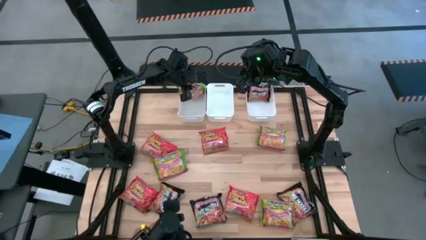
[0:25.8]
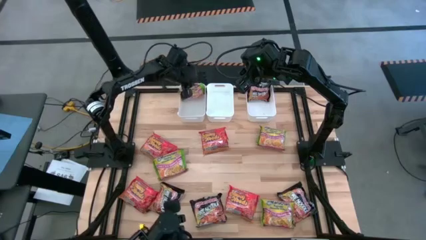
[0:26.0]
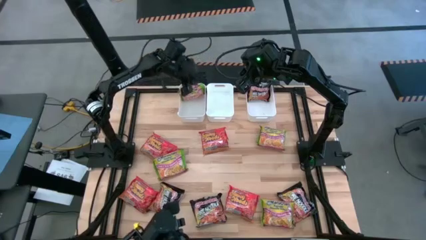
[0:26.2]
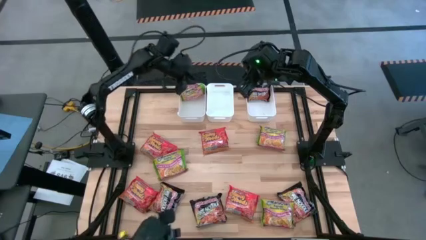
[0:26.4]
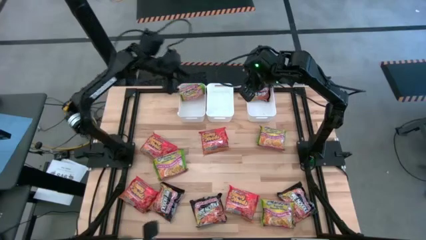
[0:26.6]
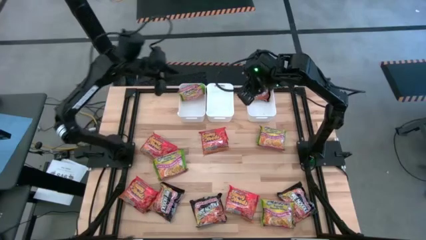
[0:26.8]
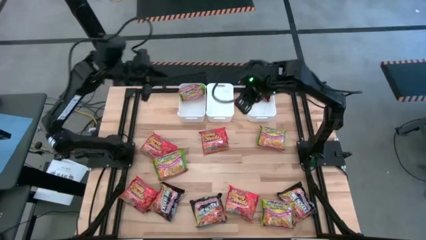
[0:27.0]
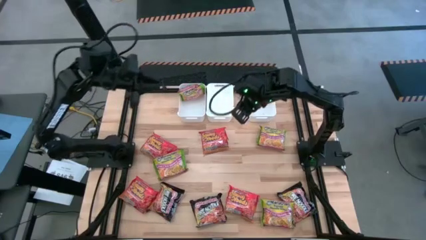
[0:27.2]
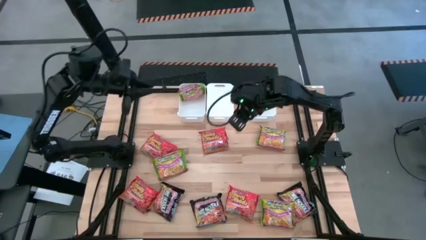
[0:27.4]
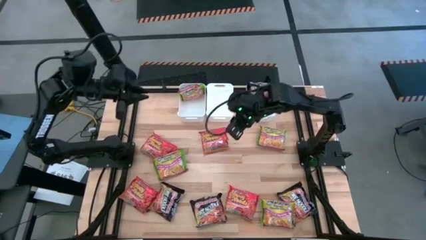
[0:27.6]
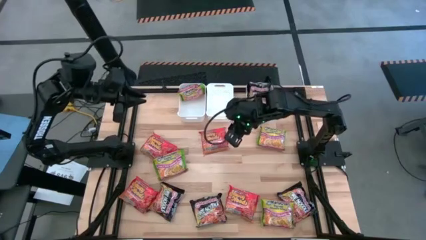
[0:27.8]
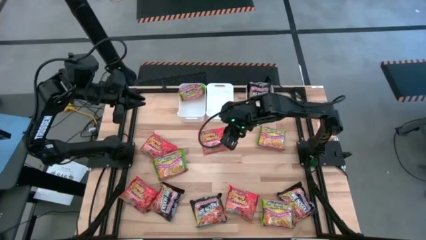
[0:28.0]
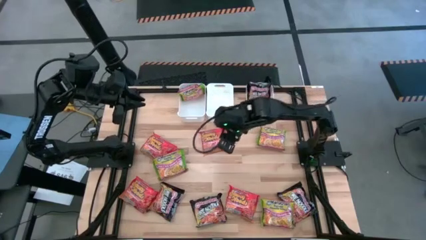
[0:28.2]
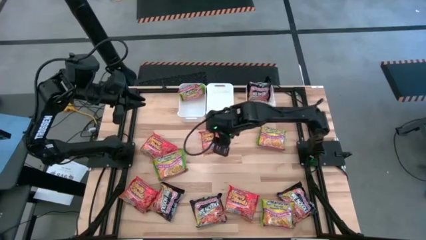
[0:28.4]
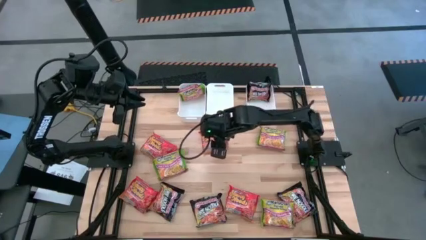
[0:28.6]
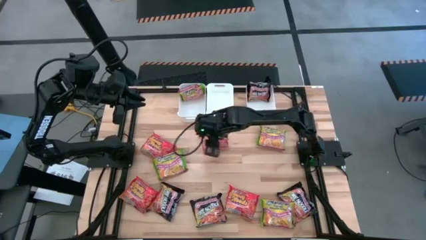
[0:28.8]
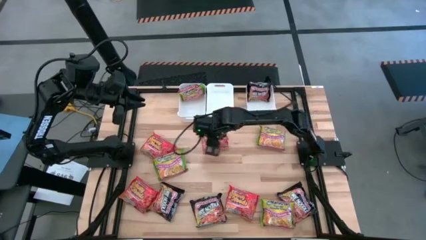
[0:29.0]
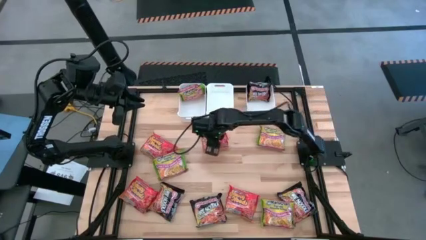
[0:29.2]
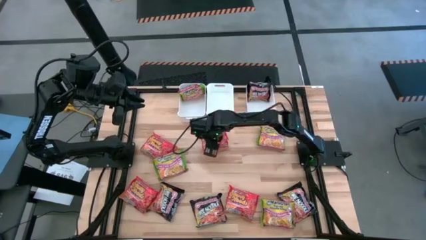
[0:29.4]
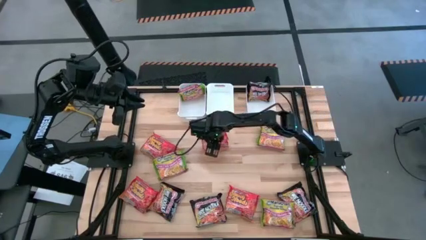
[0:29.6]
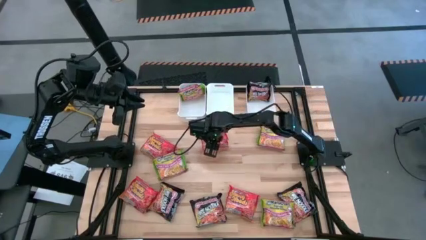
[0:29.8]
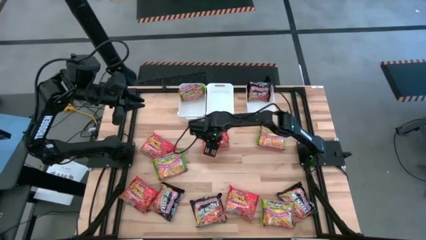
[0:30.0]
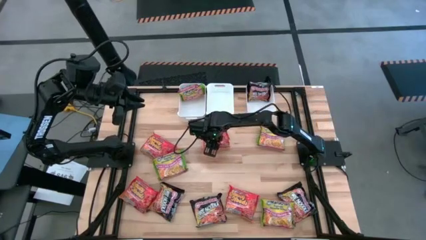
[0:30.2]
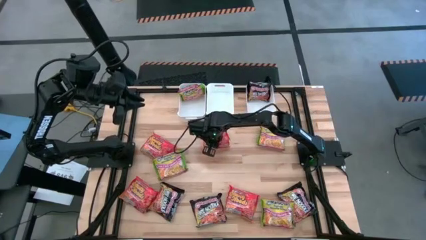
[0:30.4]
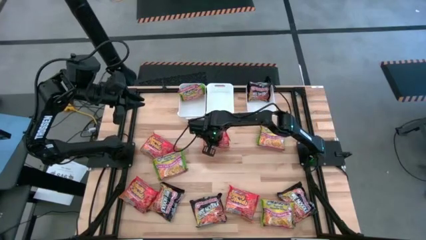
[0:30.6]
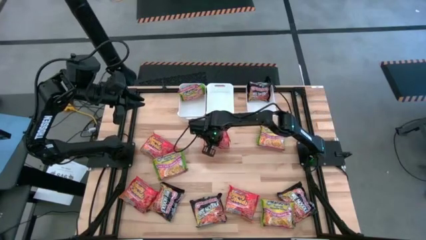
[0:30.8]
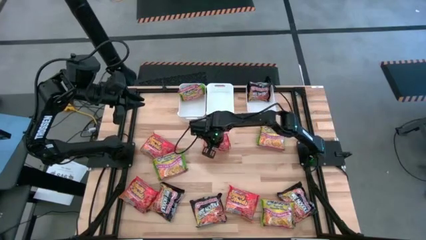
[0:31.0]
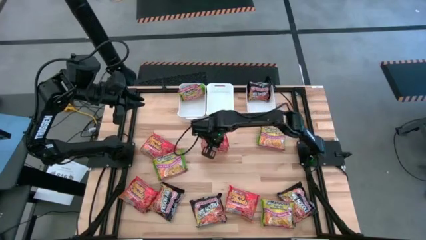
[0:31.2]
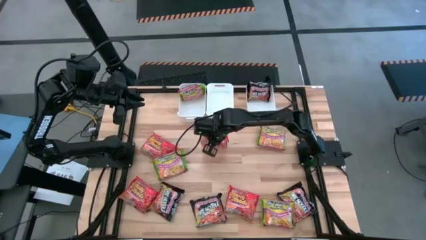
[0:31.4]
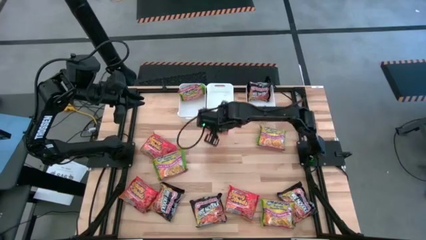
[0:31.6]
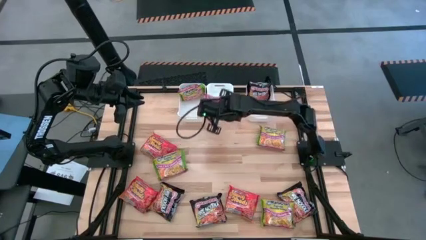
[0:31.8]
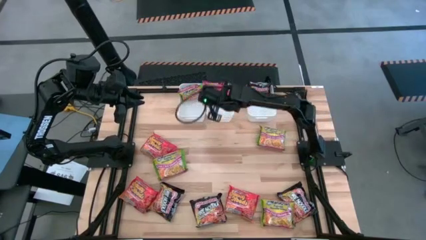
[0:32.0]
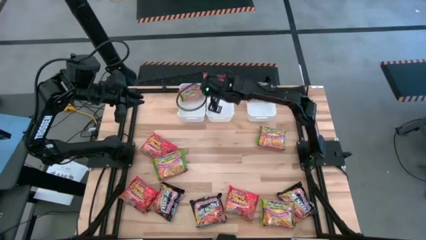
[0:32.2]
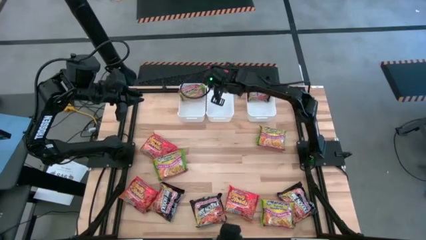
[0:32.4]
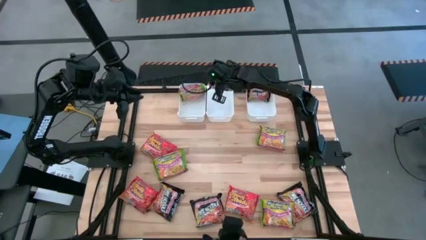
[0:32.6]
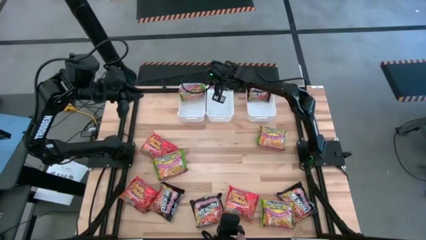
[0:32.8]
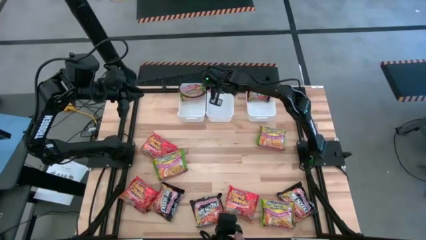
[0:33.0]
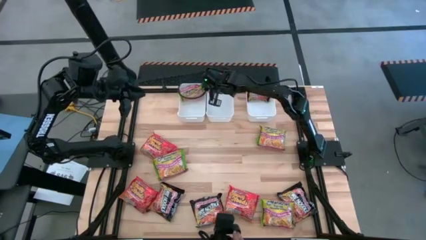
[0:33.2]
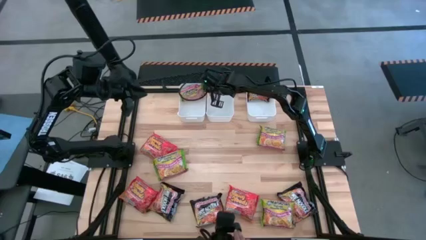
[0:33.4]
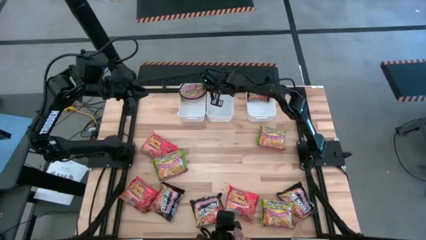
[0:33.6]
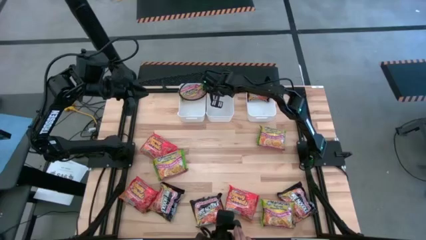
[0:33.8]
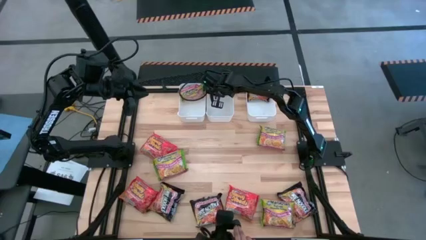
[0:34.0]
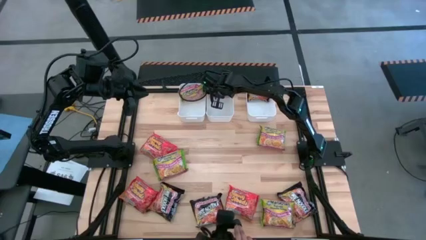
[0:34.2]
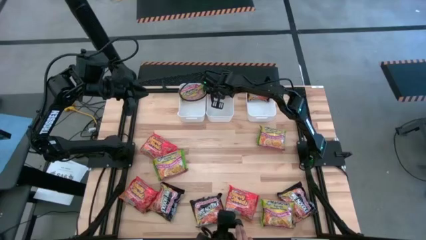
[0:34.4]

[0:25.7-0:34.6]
Task: Sort Maruchan noodles
Put the orange noodle pack into the middle white bin

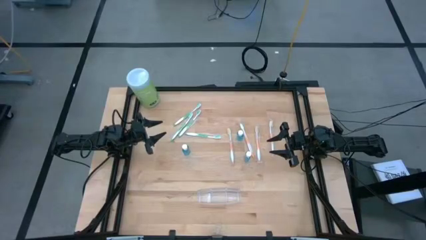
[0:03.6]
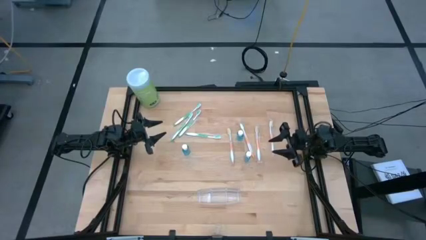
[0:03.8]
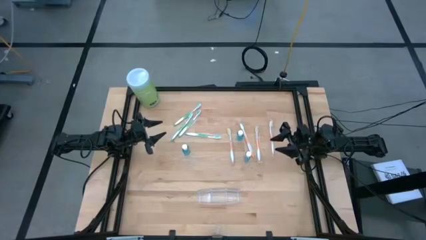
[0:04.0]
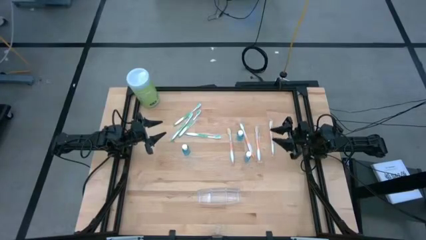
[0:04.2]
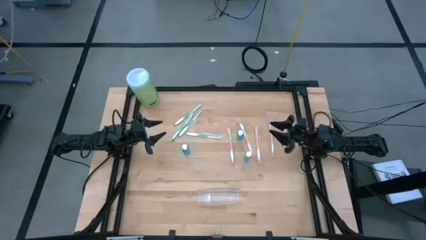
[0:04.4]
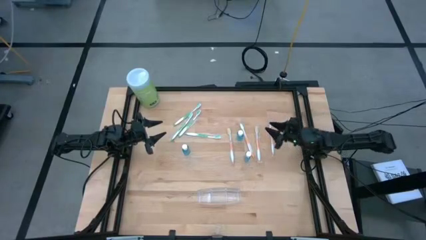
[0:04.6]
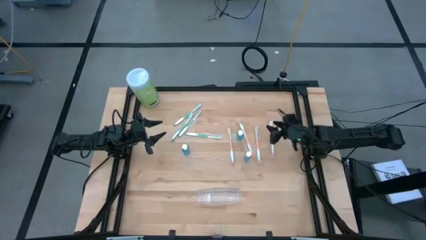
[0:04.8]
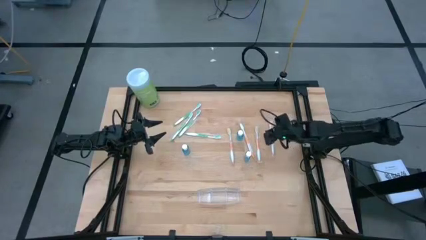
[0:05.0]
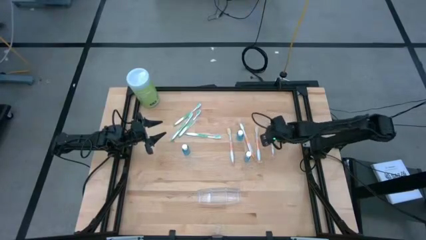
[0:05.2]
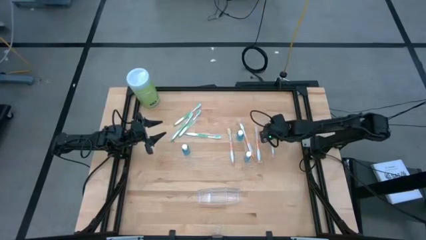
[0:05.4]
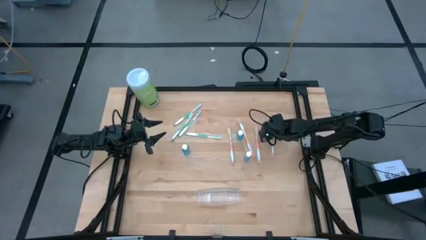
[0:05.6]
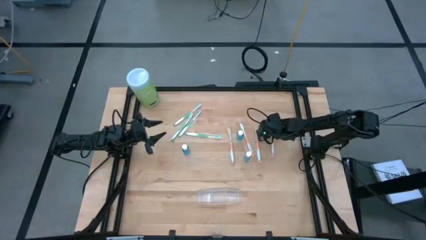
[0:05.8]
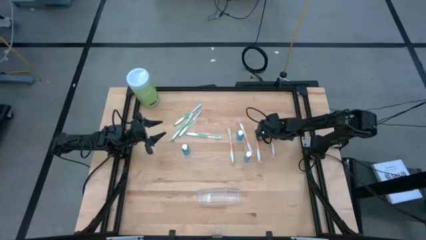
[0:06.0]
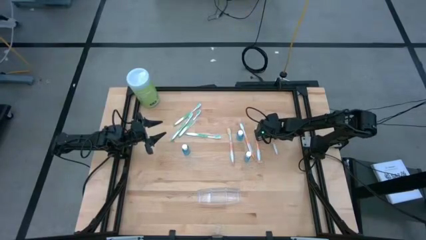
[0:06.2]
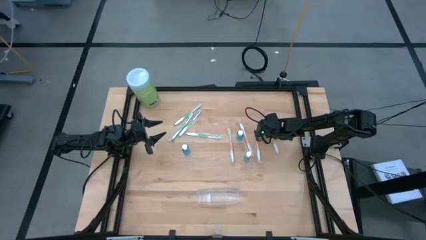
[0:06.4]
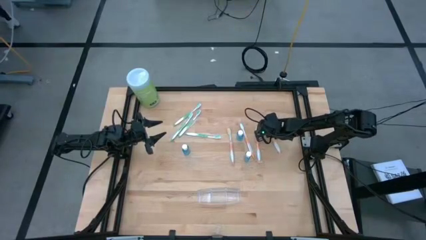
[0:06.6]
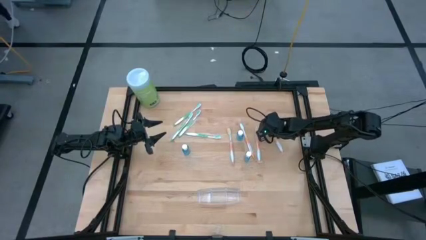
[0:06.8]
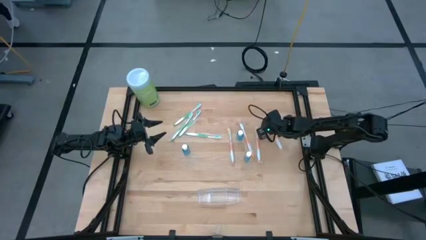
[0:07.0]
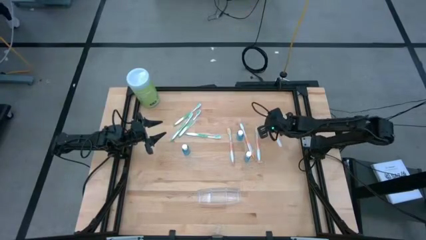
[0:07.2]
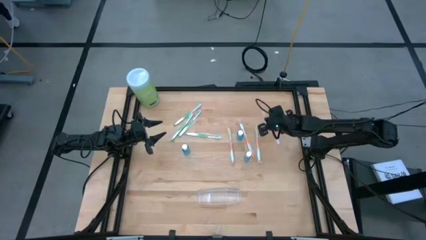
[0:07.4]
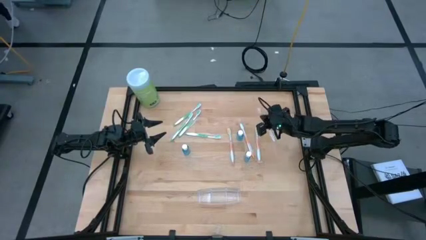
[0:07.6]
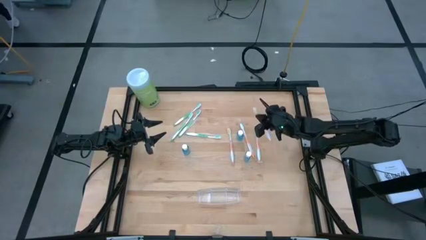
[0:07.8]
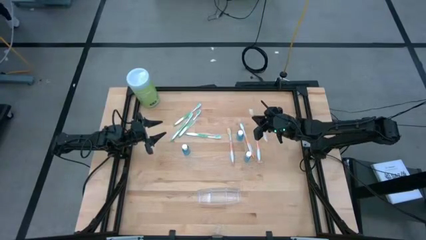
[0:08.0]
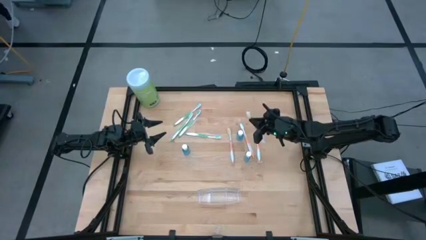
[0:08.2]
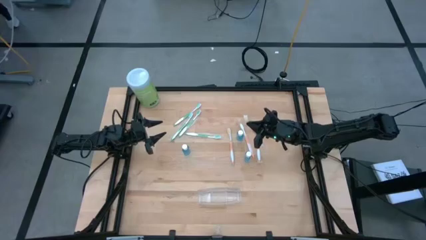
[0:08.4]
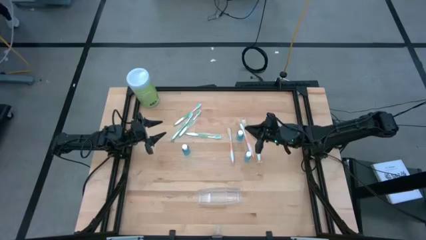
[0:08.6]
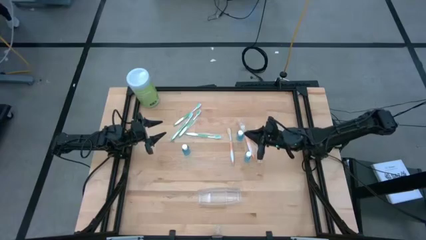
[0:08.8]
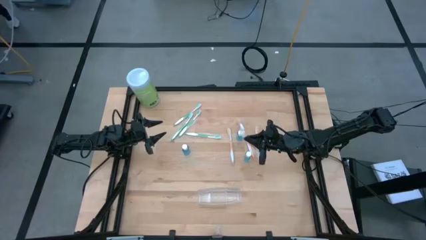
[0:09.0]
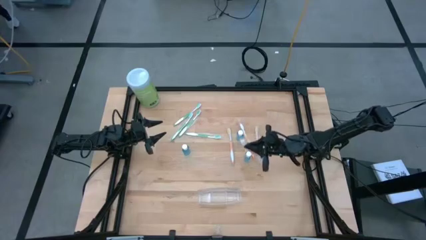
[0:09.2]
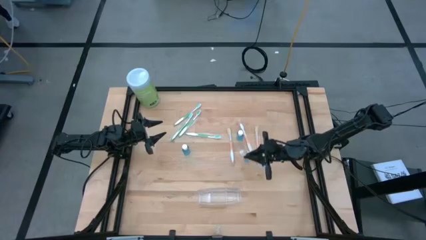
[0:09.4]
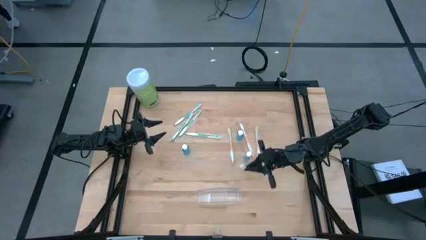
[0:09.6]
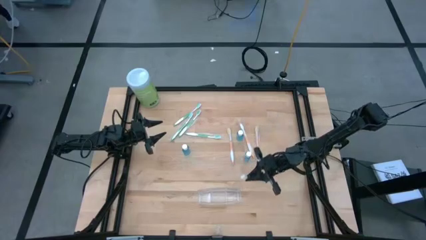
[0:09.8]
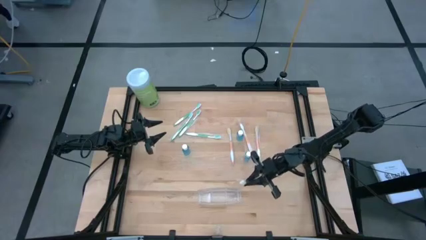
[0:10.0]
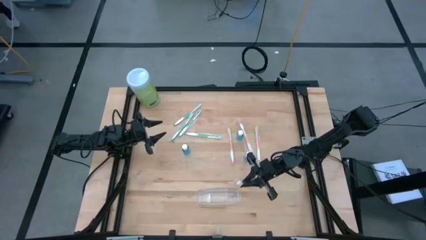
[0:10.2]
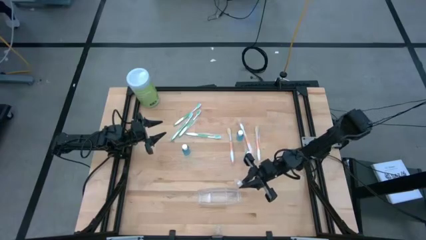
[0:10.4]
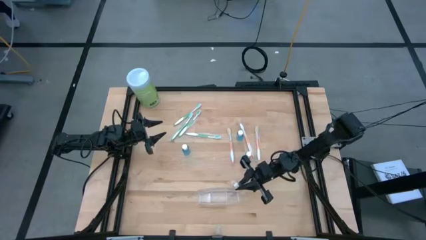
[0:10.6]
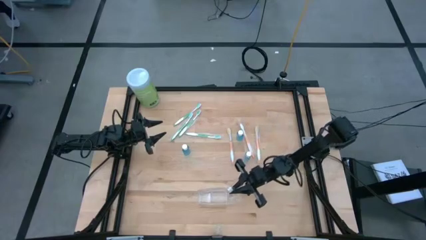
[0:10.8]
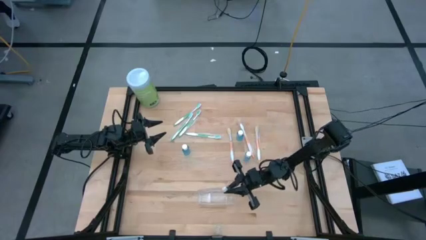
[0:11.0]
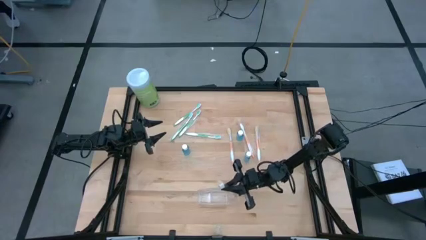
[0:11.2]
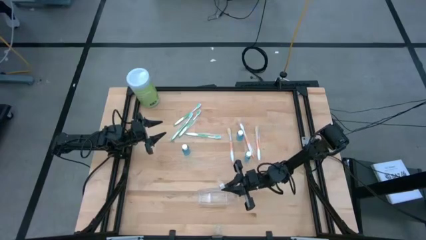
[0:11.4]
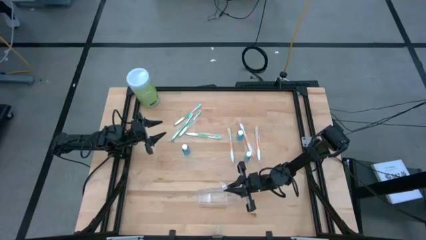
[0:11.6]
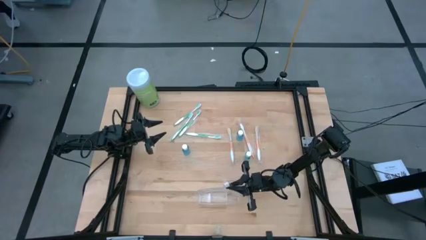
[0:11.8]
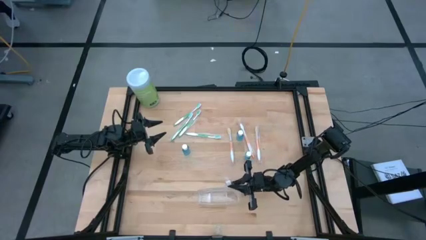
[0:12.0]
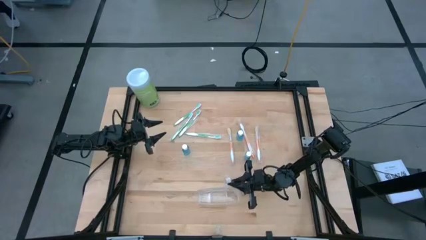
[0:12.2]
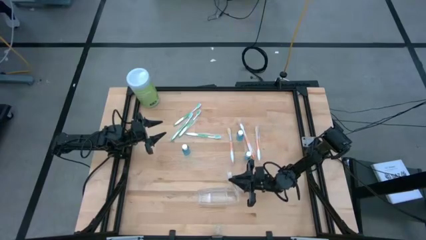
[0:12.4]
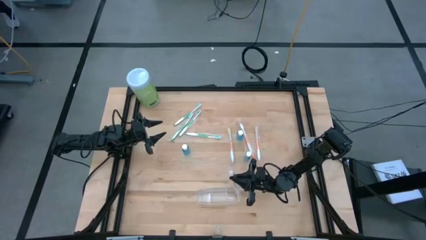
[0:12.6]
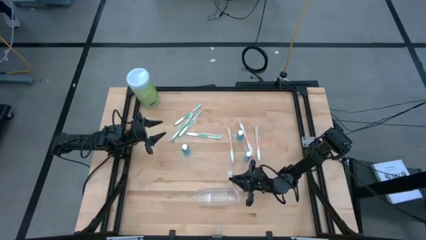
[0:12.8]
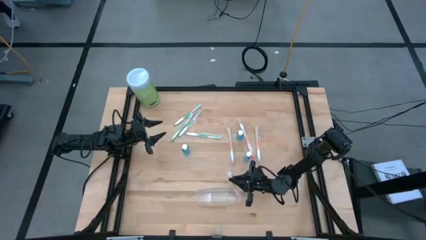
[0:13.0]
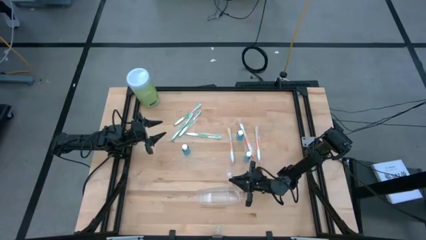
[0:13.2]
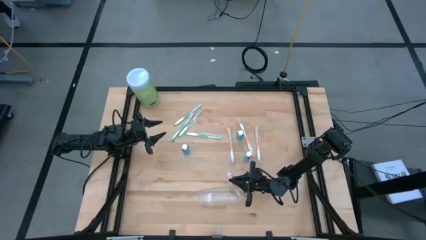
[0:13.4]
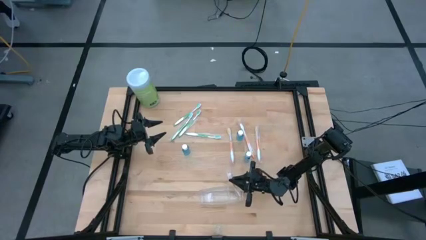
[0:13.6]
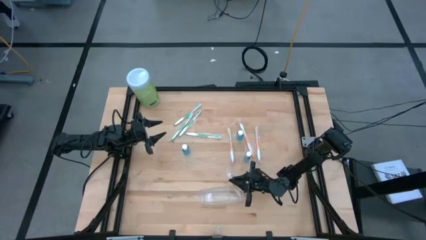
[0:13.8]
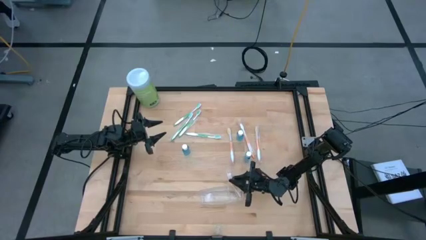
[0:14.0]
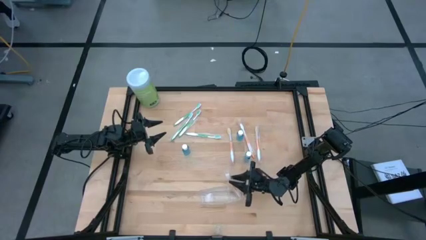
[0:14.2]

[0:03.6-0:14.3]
Task: Pick & Place toothbrushing station
Put the orange toothbrush into the transparent organizer
